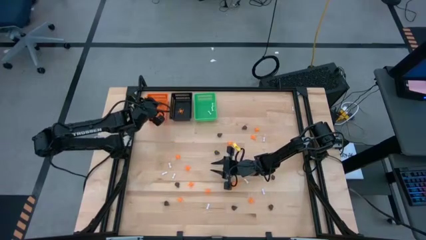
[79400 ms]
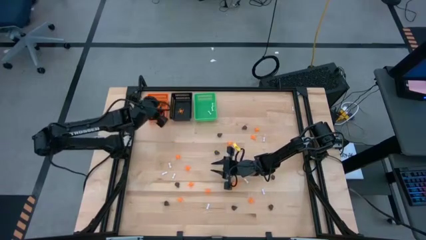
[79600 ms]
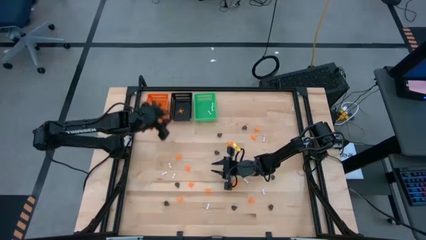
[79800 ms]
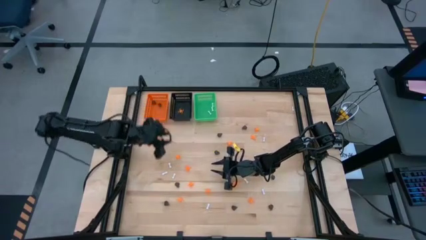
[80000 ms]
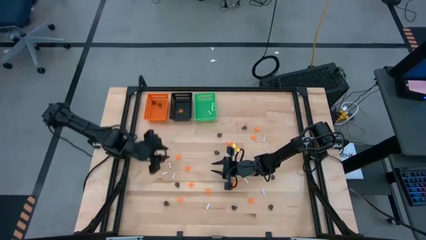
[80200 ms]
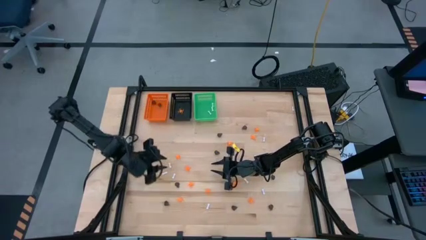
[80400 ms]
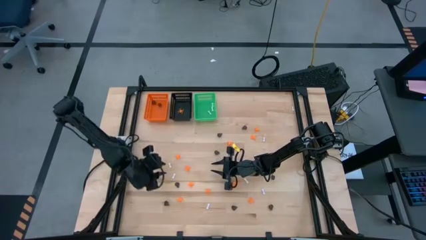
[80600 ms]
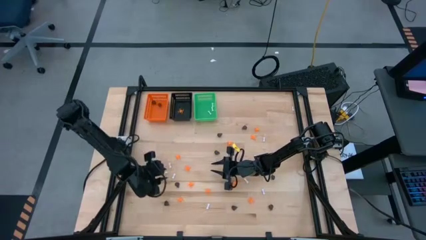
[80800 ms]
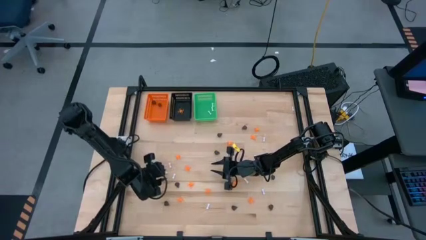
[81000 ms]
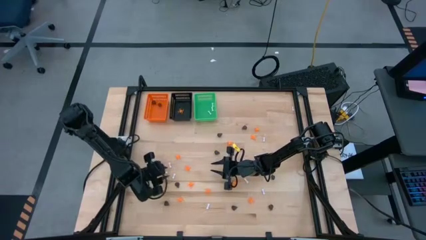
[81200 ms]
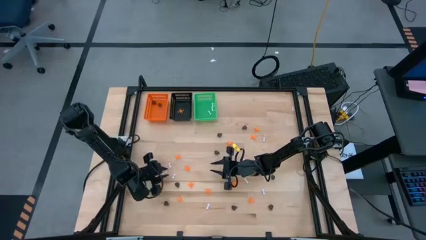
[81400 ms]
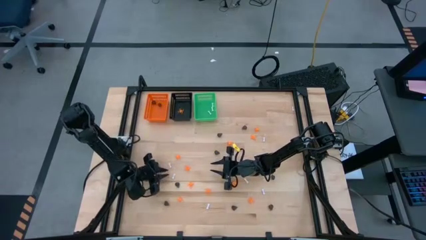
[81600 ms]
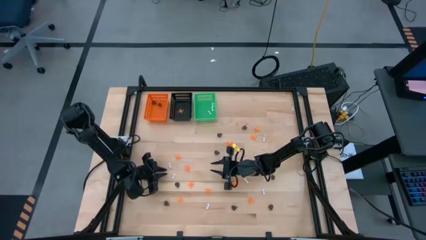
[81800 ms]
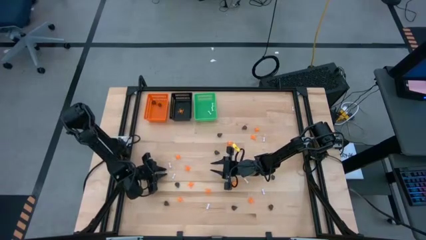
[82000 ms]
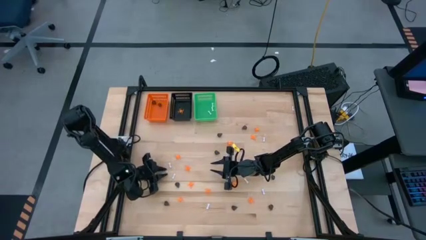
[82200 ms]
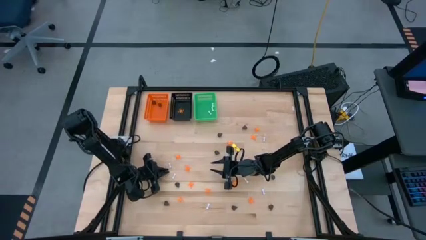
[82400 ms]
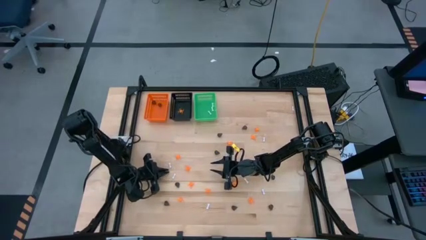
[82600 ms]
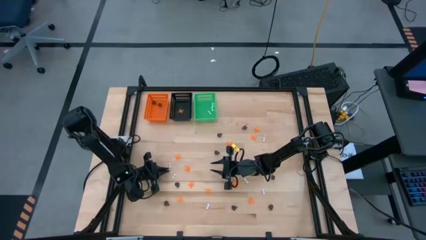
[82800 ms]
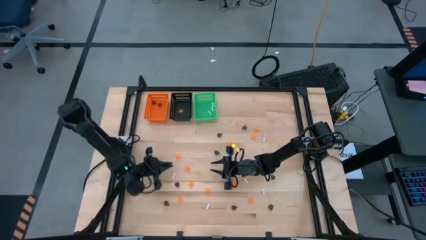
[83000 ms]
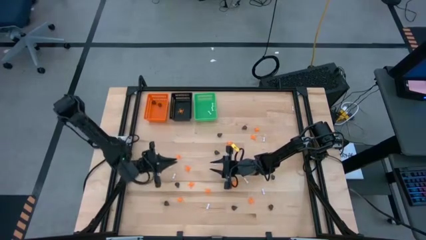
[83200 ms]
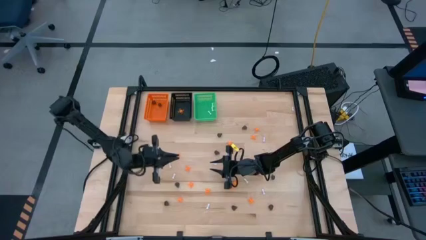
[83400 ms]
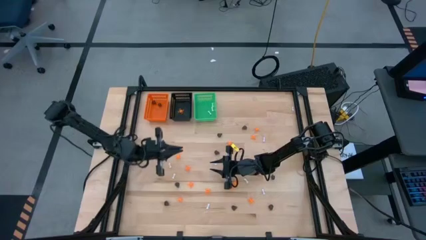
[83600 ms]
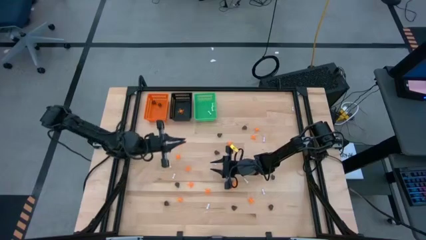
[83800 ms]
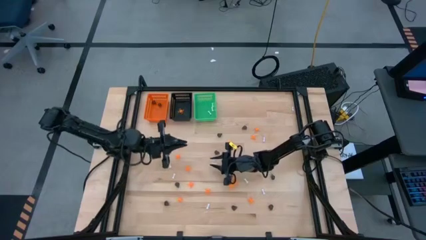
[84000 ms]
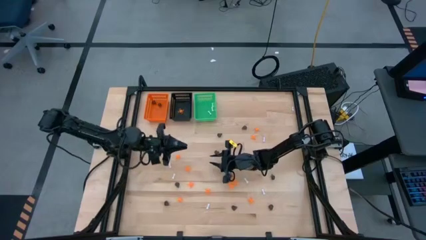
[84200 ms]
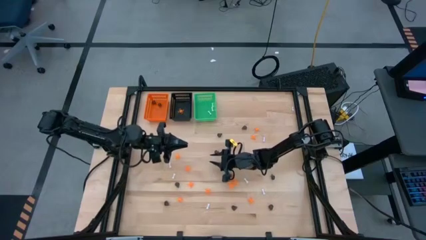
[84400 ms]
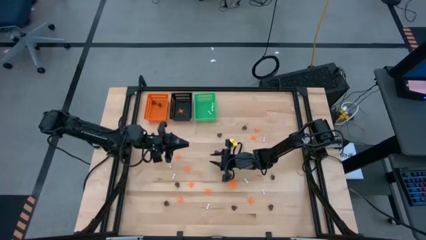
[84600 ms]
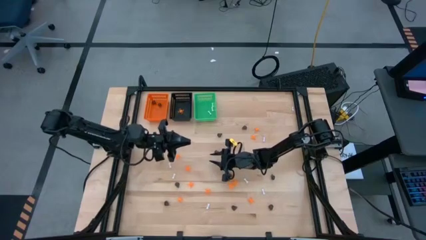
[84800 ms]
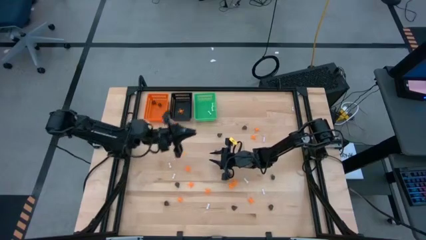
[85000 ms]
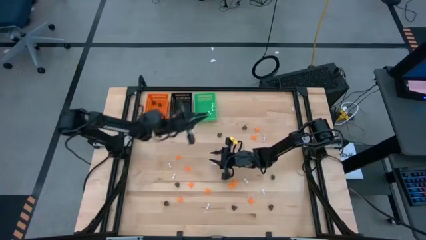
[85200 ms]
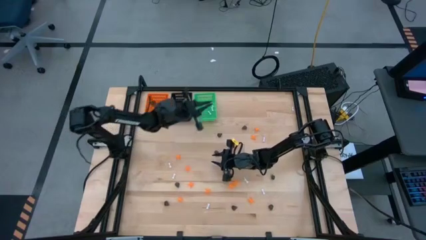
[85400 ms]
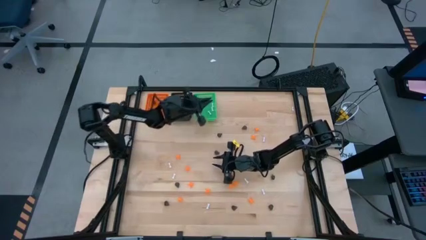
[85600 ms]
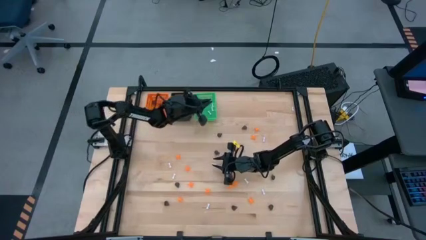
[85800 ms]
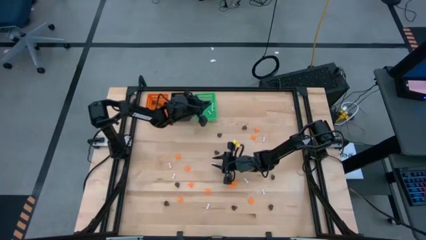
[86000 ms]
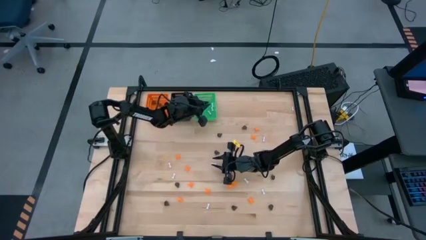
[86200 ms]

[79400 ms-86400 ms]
Task: Sort Halloween decoration
Put the white bone toy into the green bin

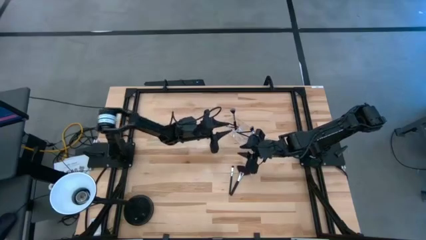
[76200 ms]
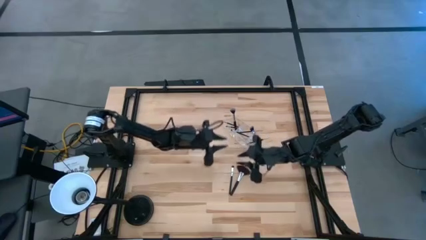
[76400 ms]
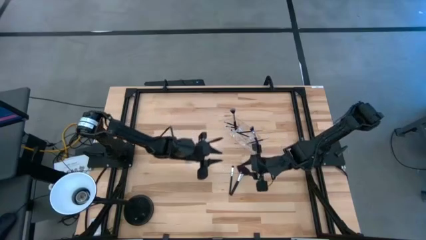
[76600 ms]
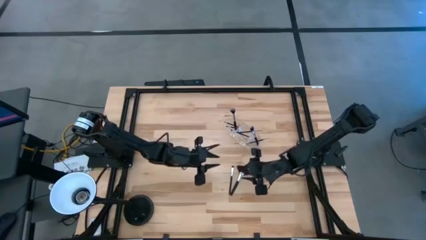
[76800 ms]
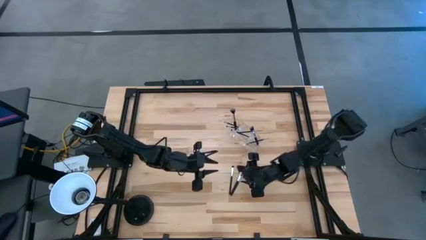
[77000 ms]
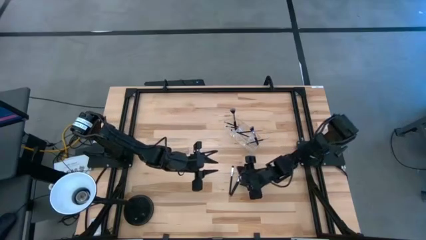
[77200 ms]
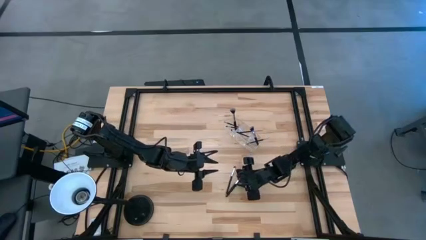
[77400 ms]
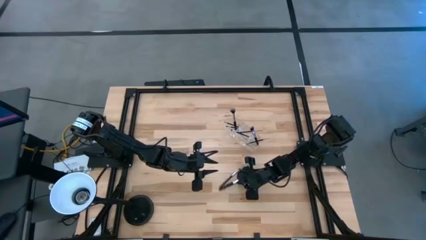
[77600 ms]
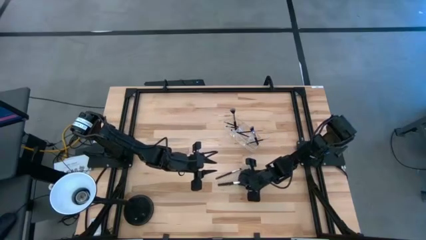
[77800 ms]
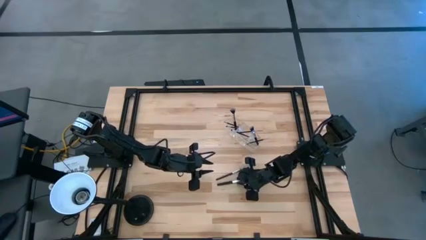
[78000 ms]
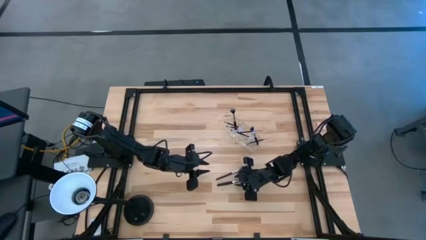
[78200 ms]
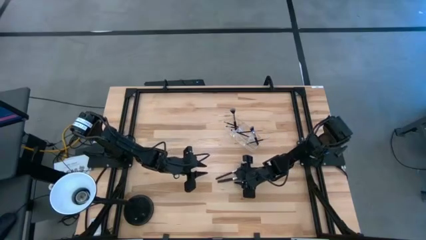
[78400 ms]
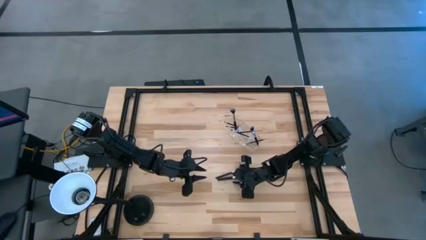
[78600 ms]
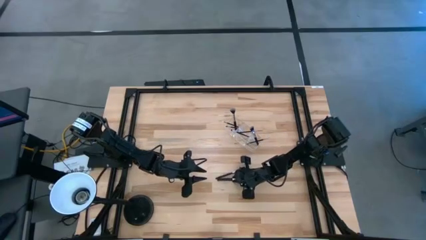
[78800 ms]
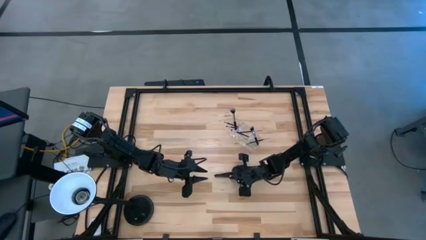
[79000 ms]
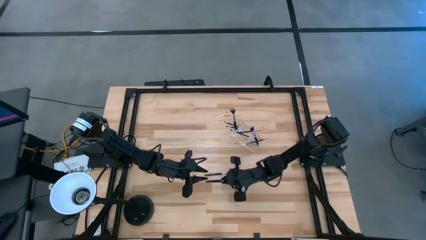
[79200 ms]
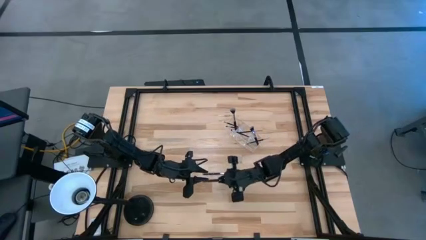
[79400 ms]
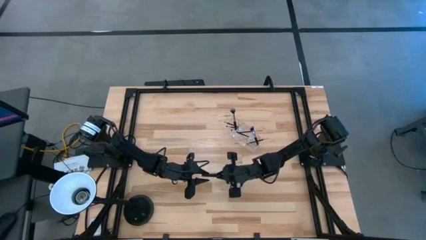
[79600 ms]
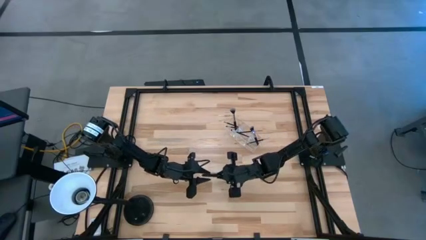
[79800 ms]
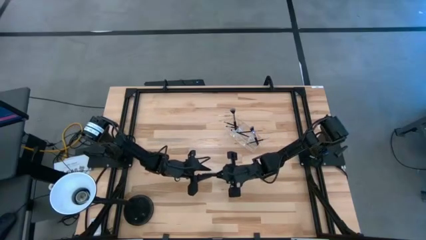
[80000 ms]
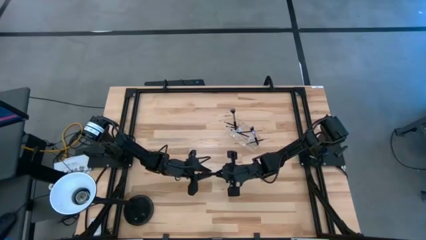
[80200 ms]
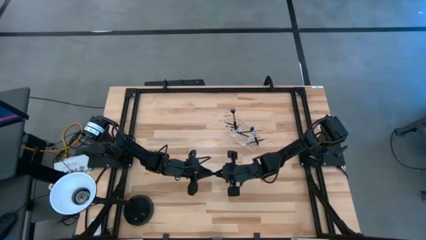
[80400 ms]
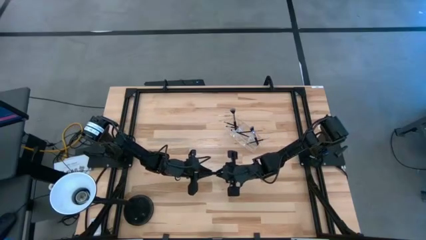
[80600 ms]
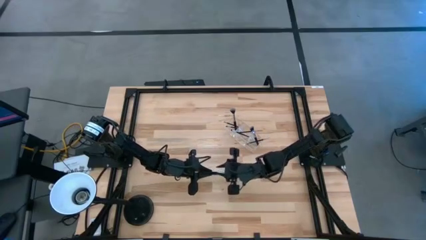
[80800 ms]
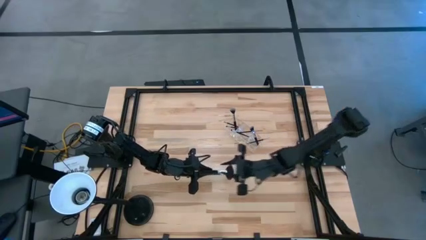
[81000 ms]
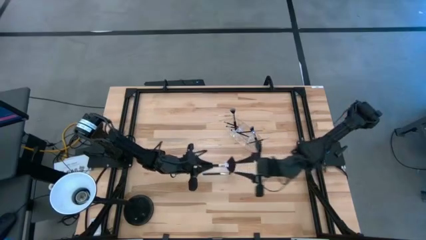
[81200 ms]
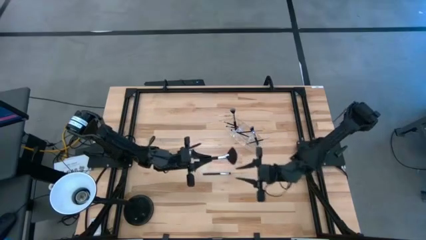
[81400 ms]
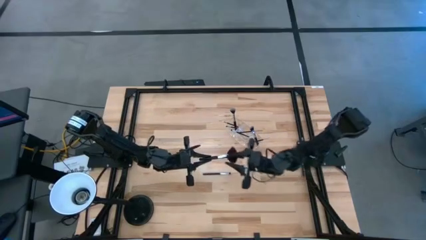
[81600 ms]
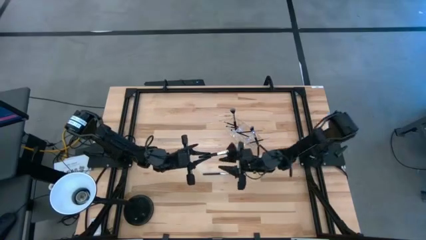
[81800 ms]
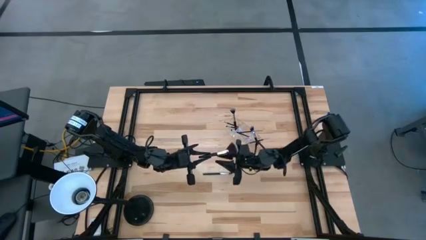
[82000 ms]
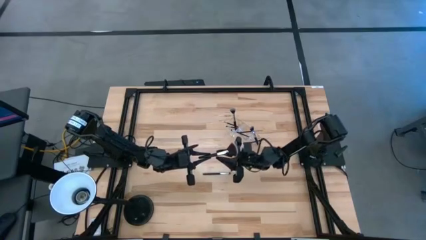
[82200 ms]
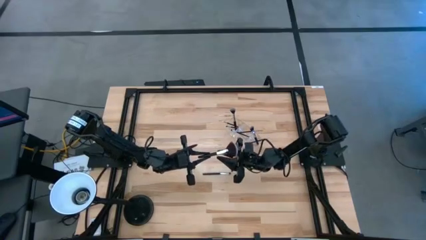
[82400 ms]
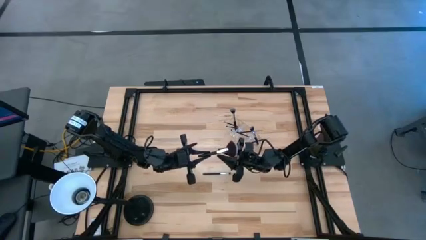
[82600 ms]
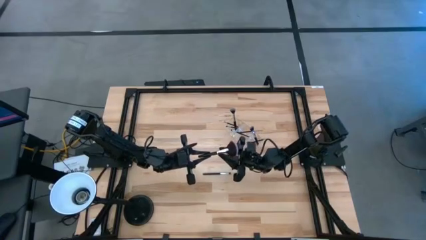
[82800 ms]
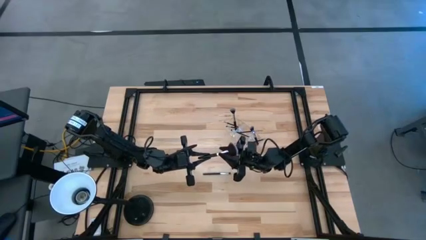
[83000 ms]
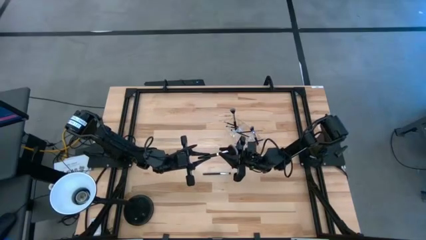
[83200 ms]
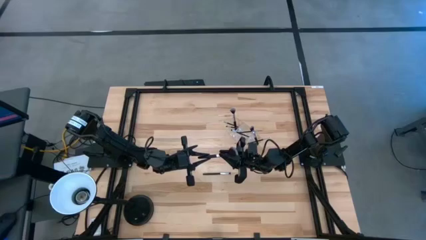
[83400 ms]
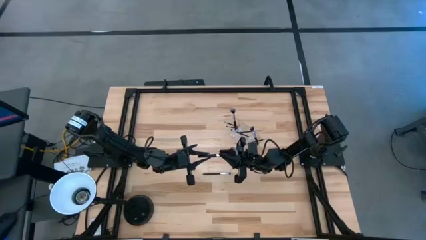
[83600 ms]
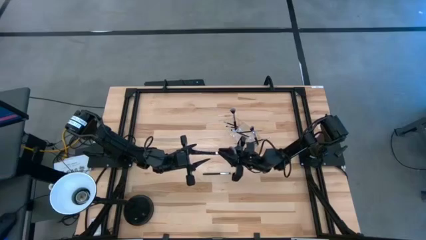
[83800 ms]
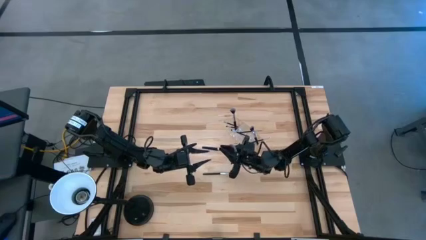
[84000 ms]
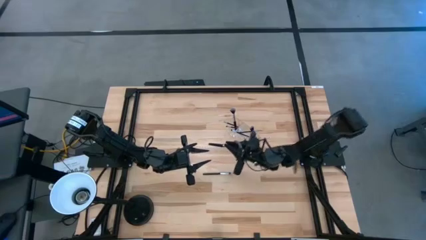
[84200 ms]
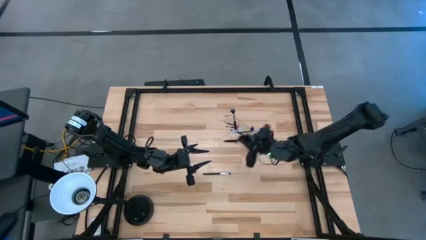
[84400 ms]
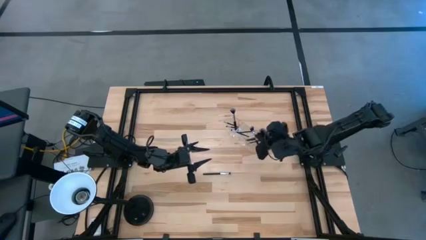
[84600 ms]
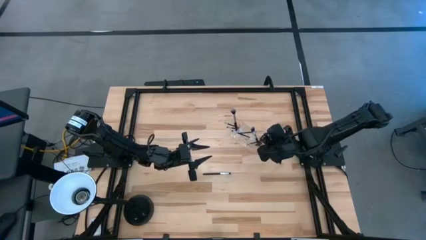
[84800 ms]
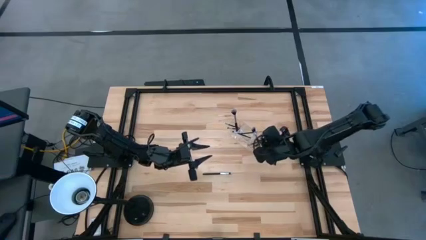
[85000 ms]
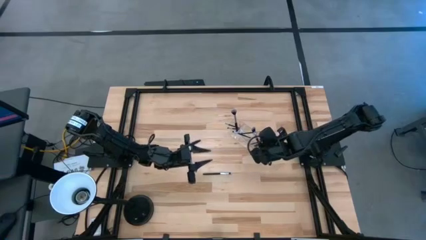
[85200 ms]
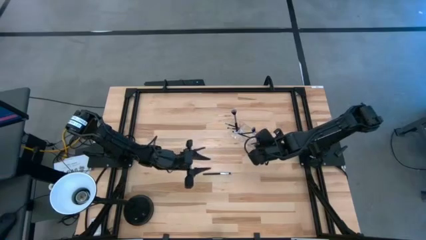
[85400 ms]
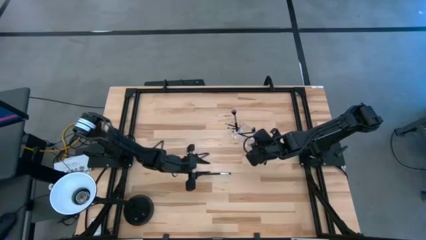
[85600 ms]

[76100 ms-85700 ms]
Task: Put items in baskets/containers
Put the highlighter brush into the transparent organizer
